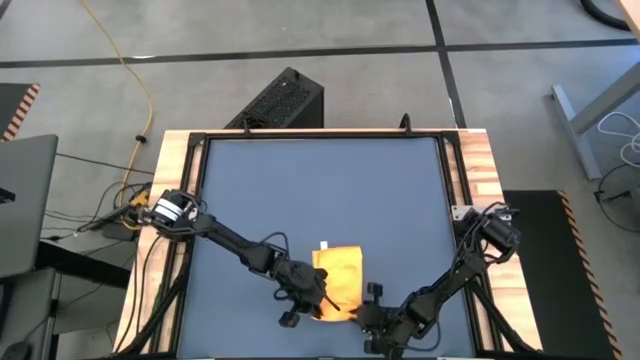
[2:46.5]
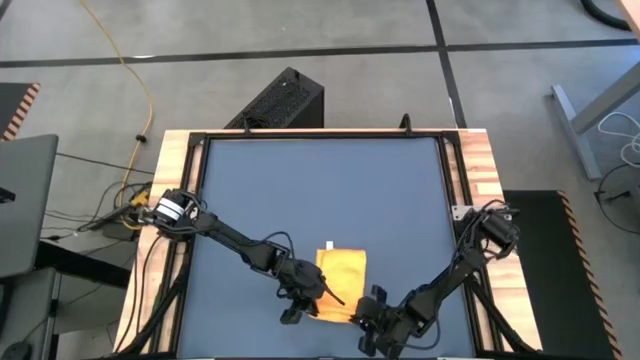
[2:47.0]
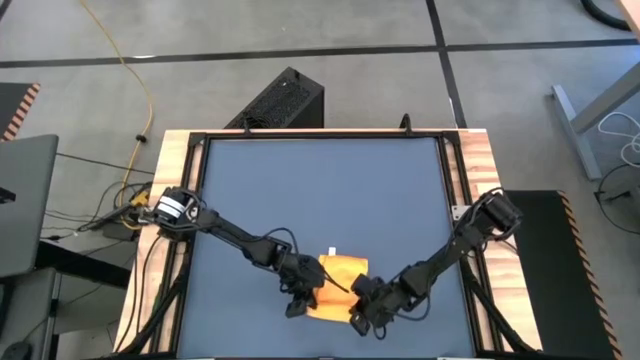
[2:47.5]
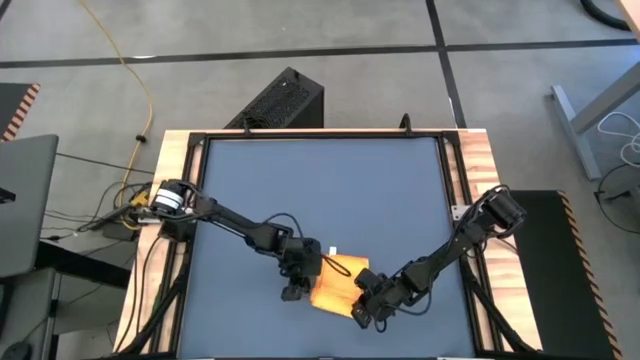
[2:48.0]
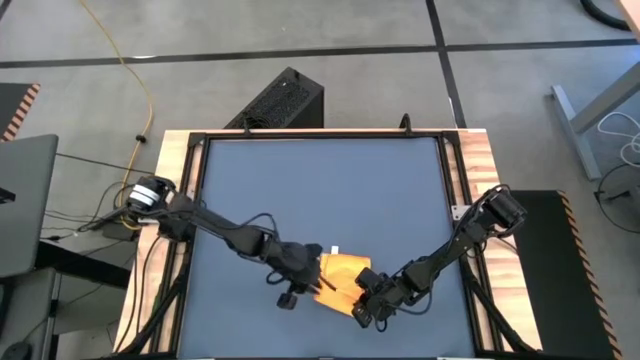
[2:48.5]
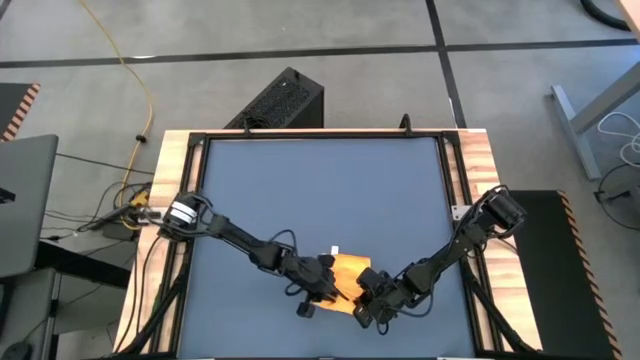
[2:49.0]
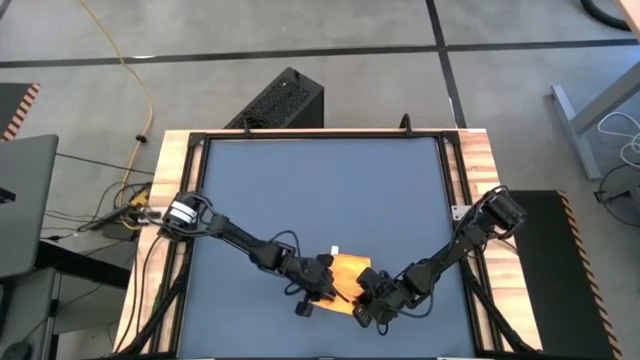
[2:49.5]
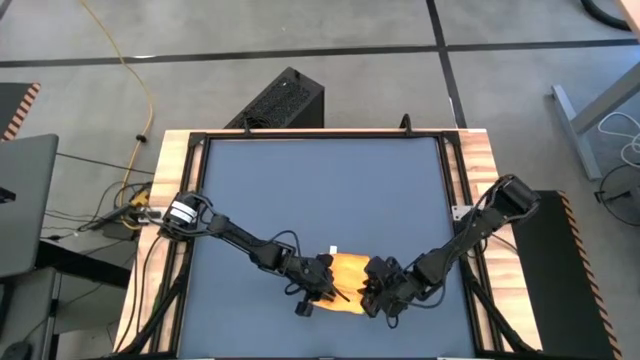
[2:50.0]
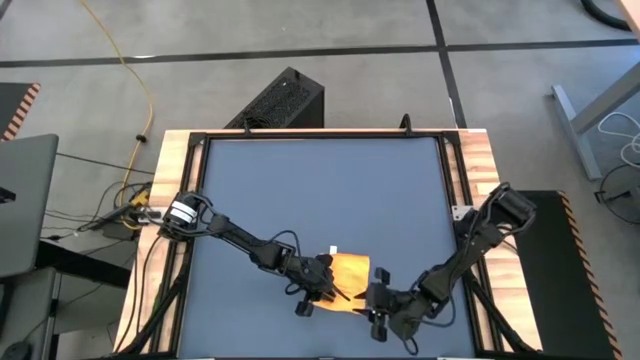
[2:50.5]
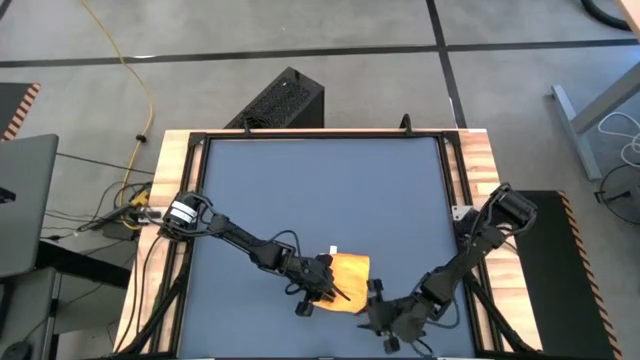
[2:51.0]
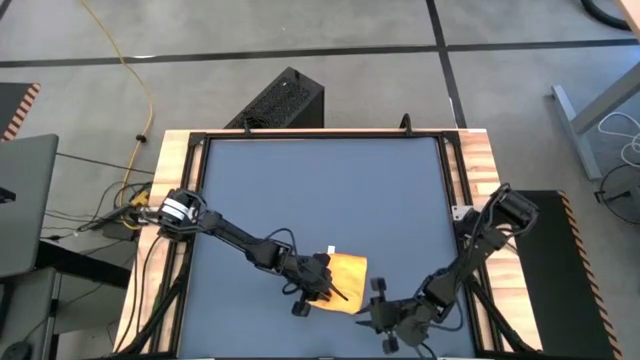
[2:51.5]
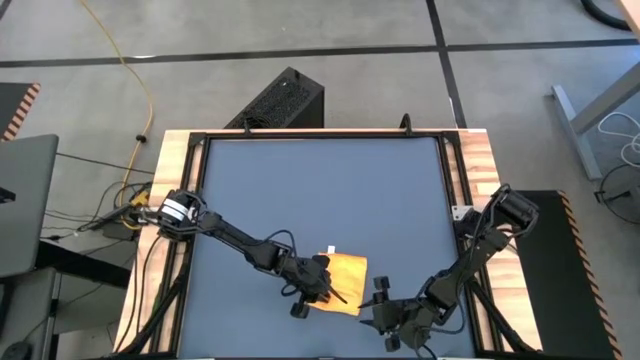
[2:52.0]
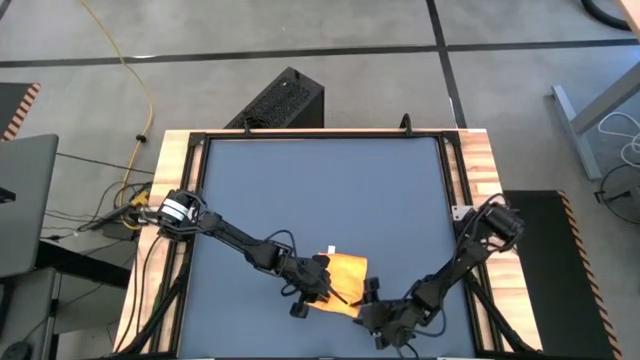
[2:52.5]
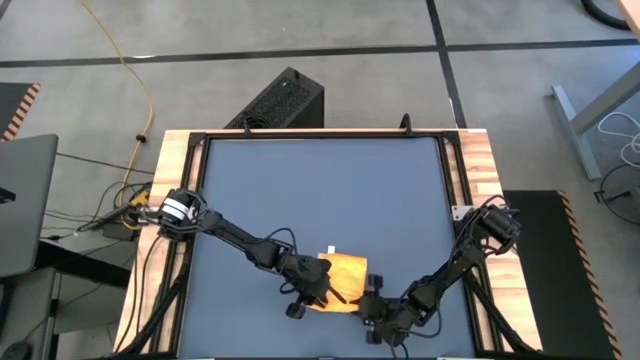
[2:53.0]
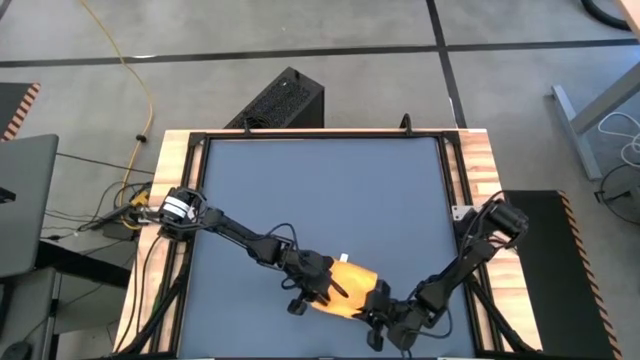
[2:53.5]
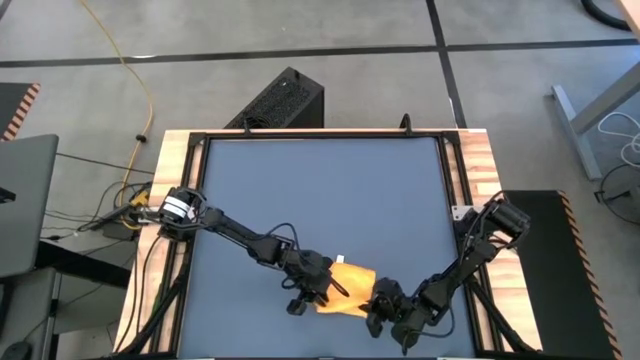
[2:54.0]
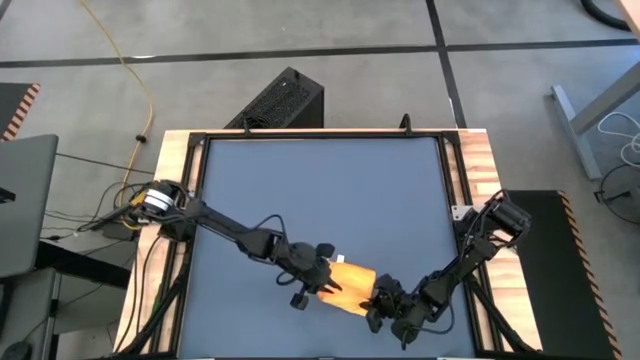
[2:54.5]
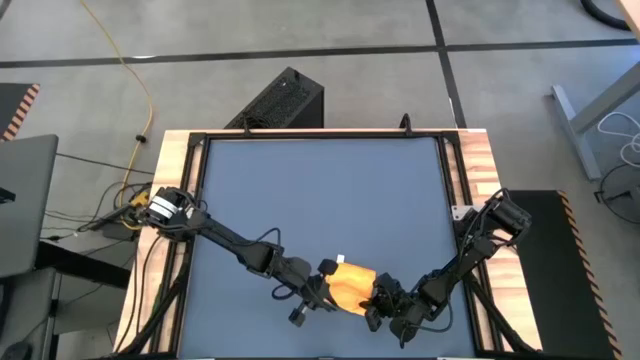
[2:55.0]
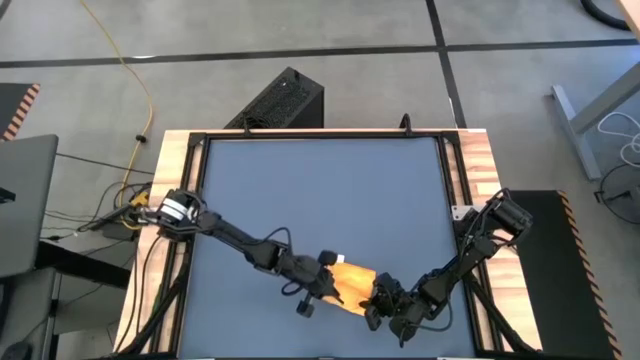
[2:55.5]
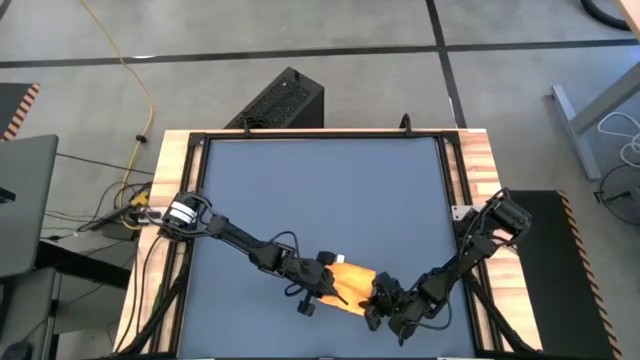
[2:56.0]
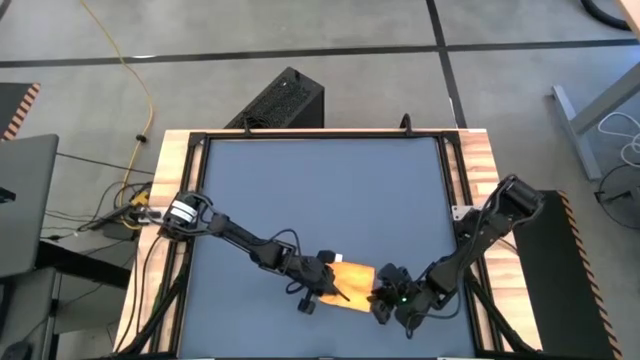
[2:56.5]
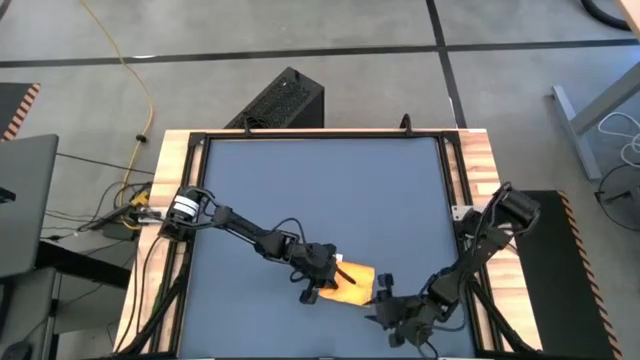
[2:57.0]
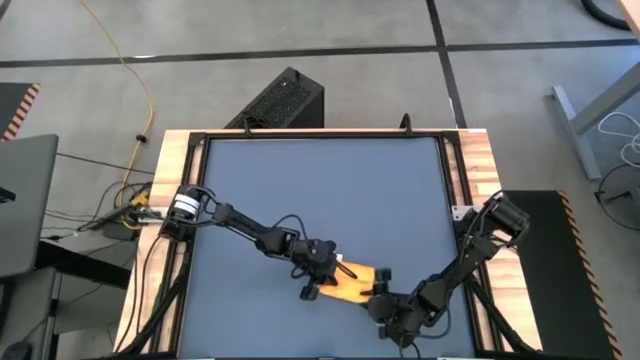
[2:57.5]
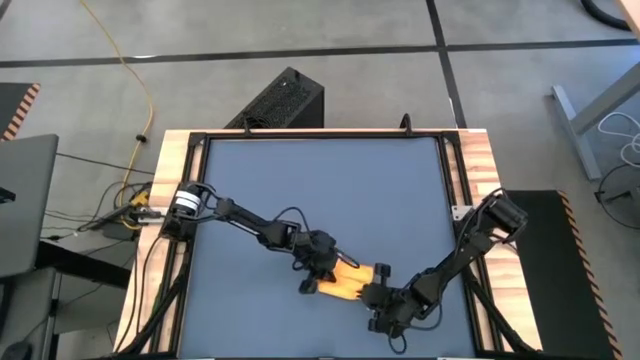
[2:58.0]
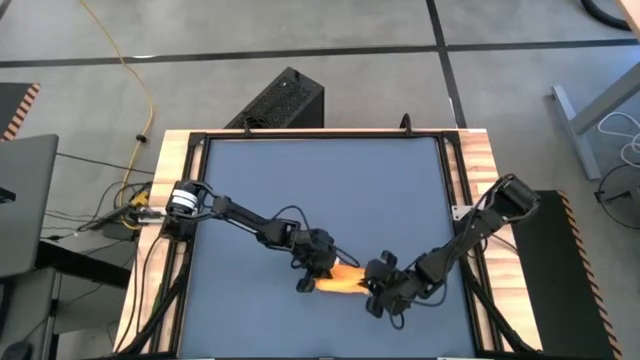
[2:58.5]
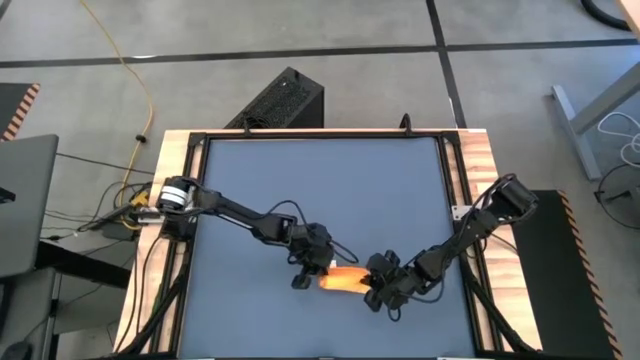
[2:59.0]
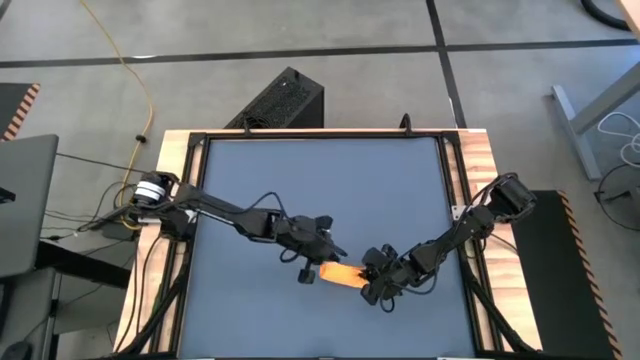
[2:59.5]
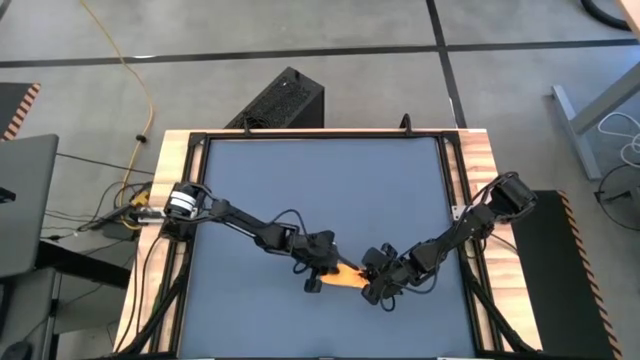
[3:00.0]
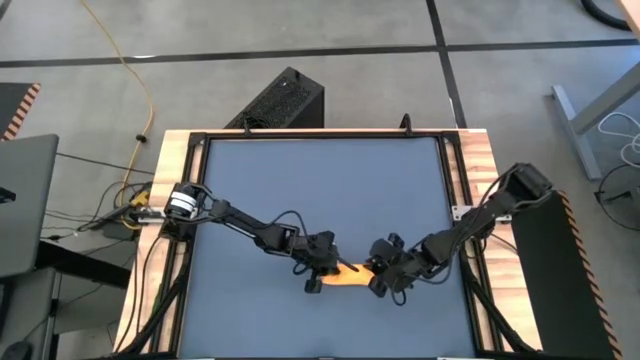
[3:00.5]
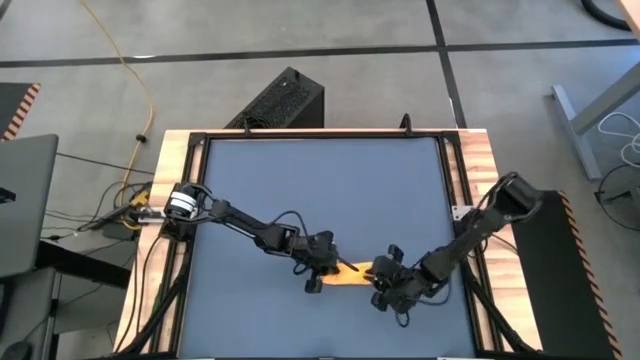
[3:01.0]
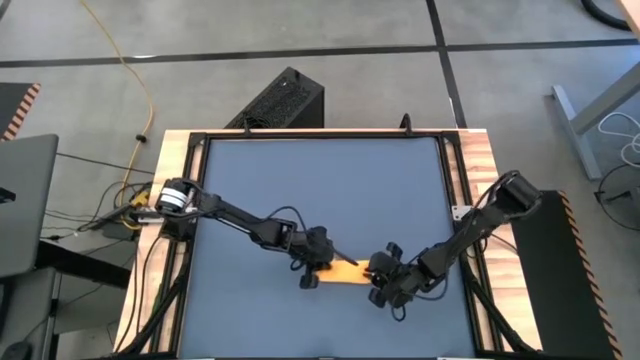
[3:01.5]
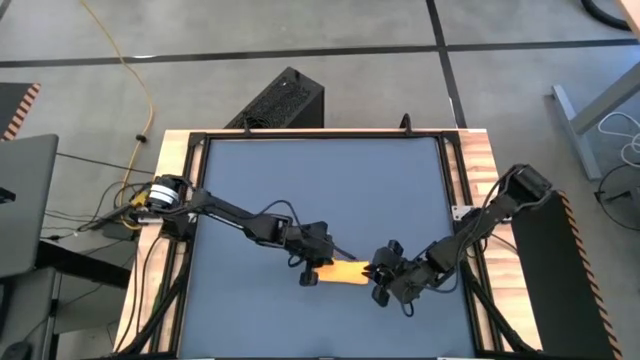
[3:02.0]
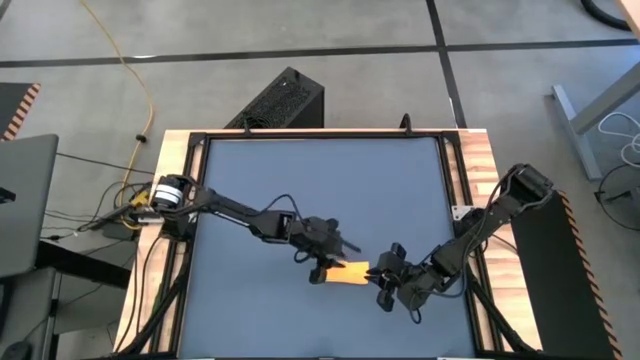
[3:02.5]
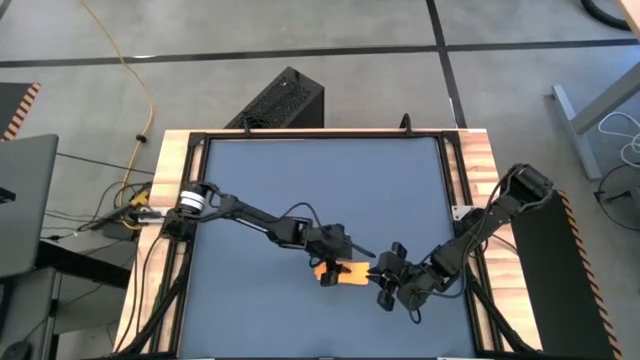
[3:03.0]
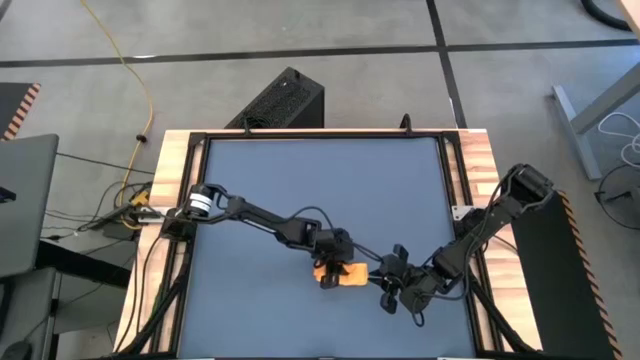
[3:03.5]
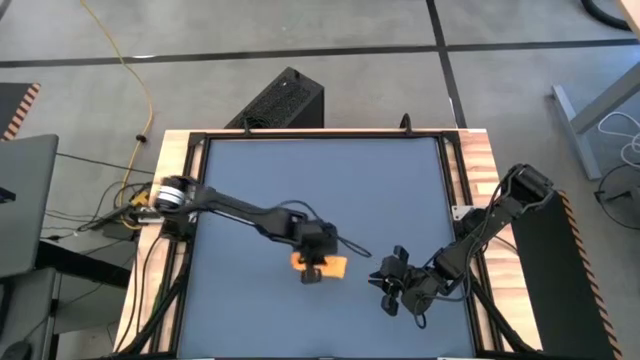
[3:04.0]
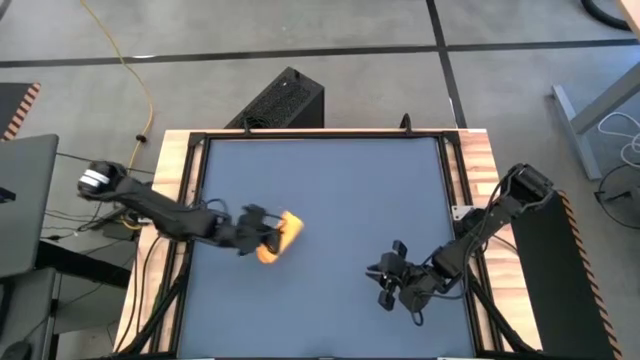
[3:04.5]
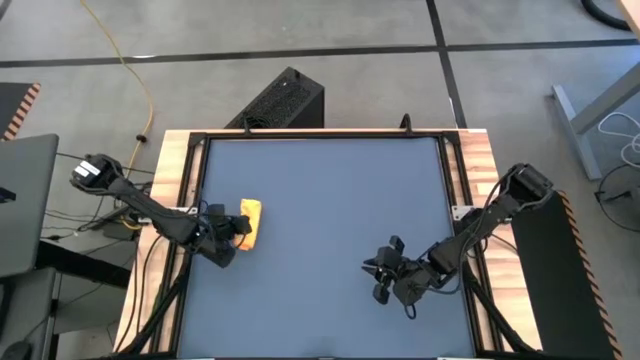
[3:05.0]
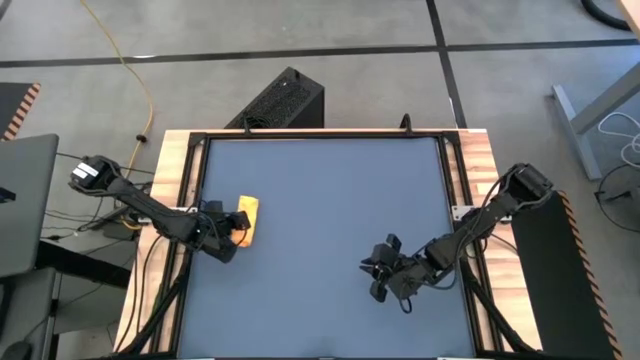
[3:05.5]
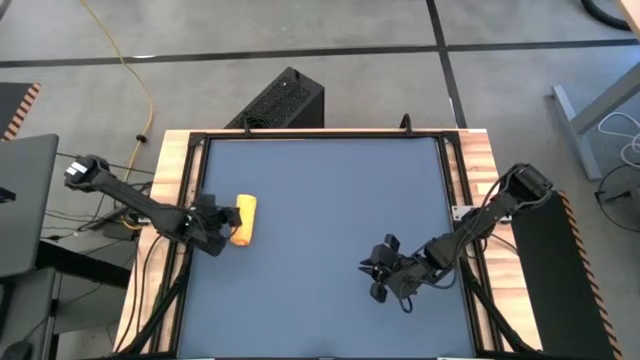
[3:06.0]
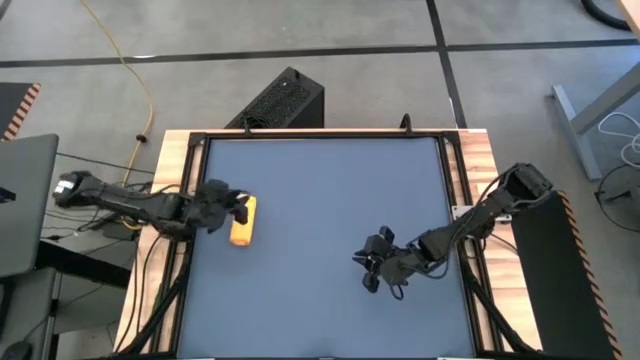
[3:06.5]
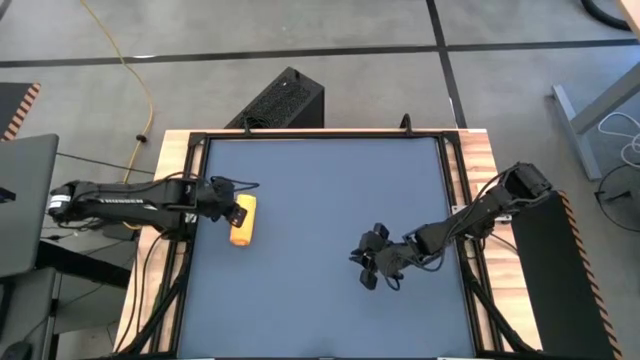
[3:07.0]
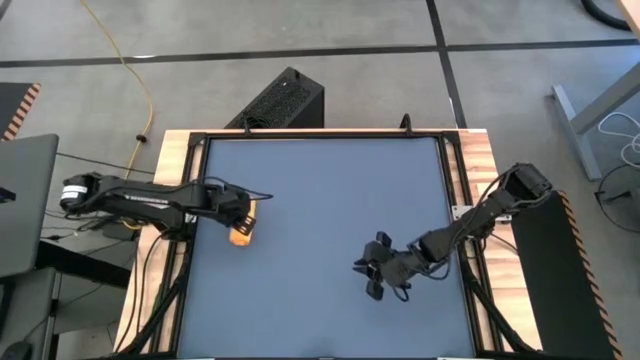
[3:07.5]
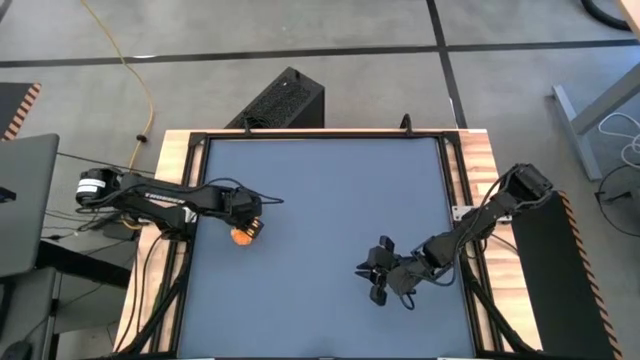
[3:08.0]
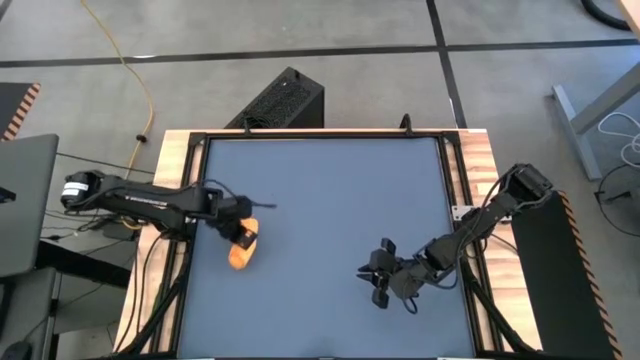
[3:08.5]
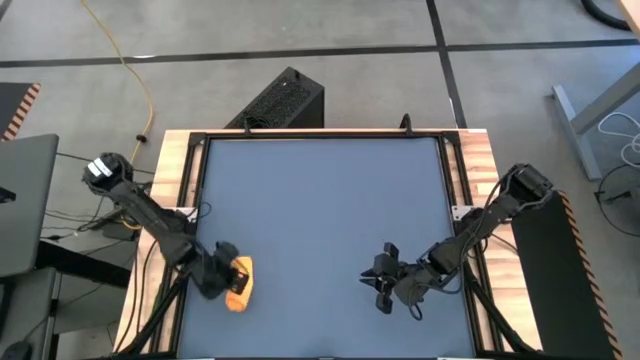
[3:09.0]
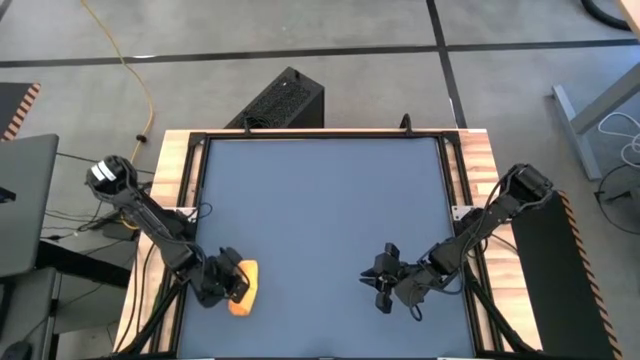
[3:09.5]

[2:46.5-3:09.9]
Task: Roll towel into tight, uniform cylinder
Roll the orange towel
